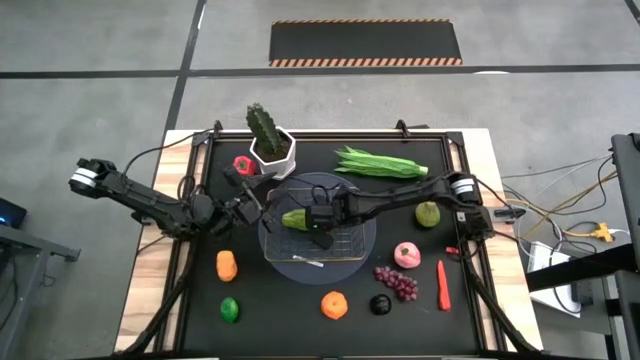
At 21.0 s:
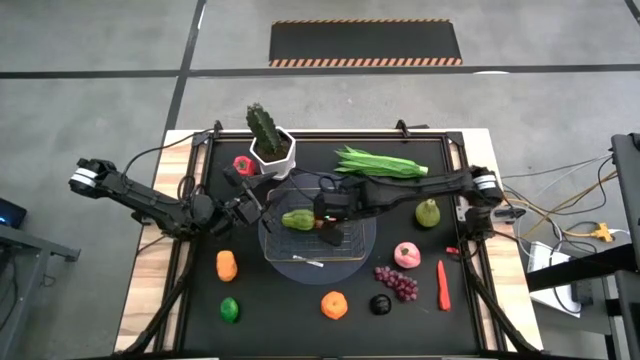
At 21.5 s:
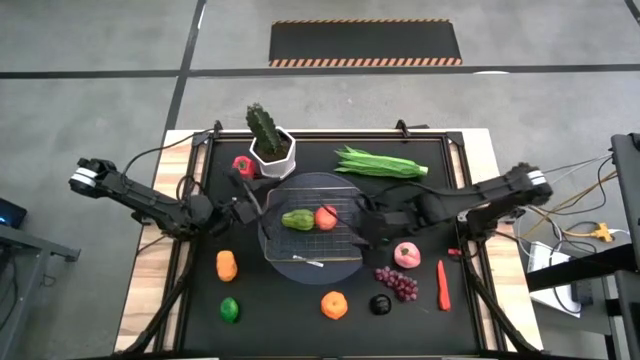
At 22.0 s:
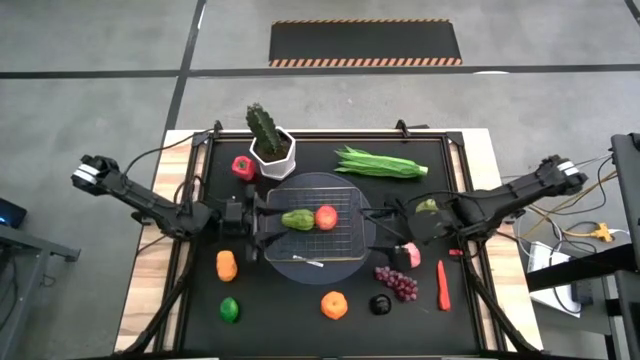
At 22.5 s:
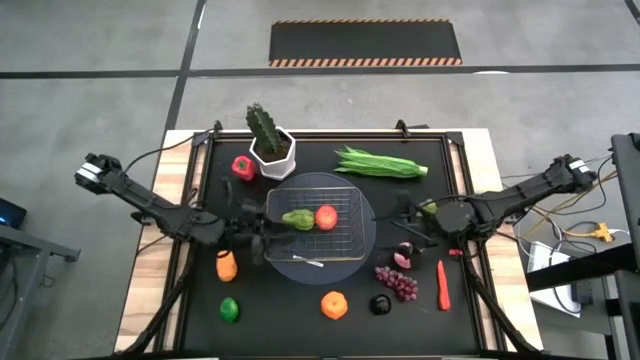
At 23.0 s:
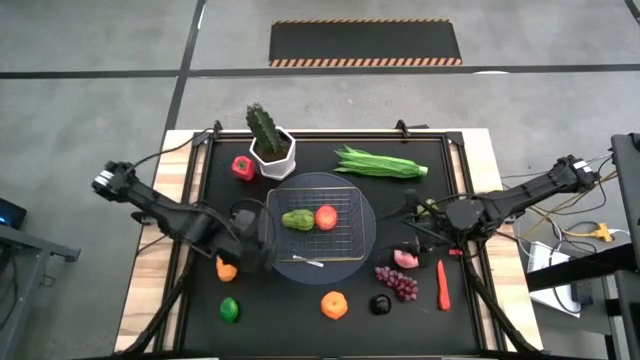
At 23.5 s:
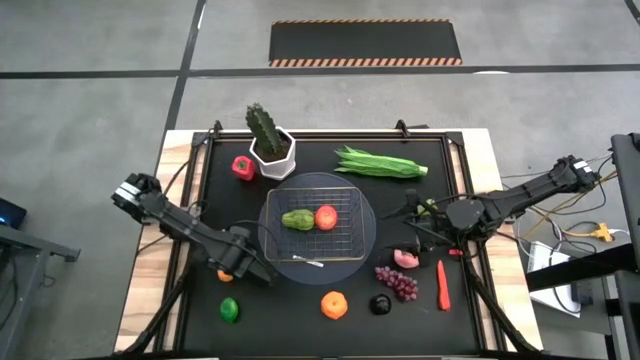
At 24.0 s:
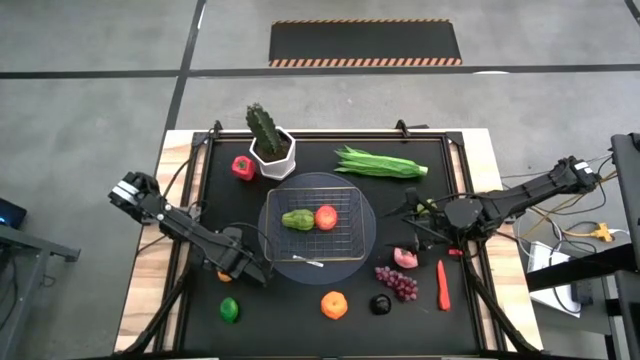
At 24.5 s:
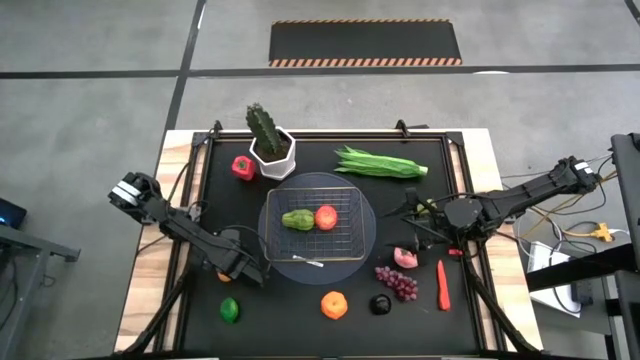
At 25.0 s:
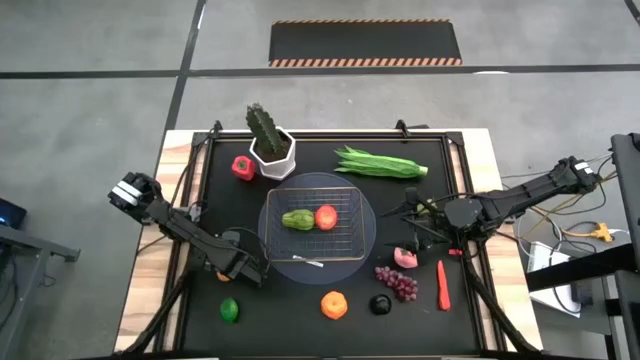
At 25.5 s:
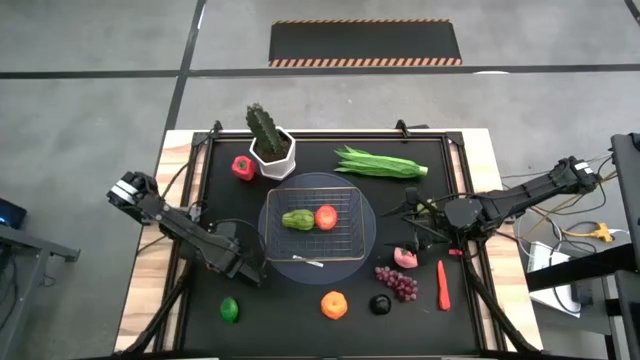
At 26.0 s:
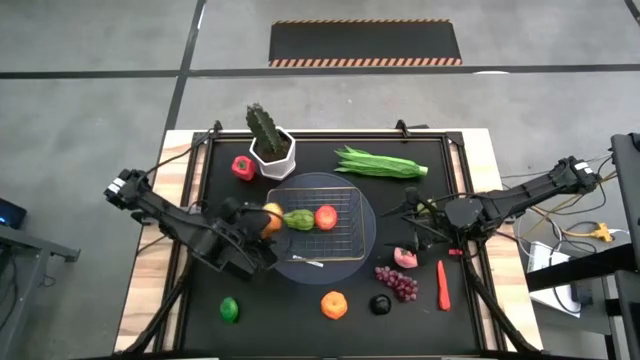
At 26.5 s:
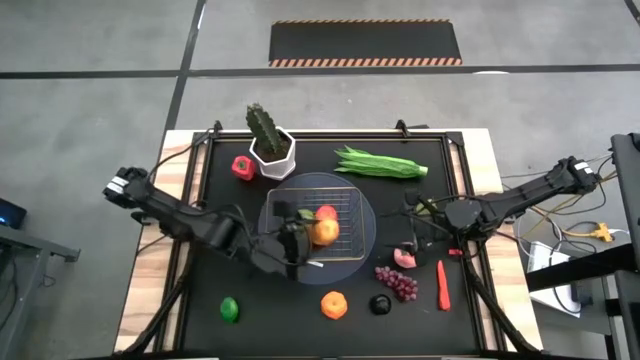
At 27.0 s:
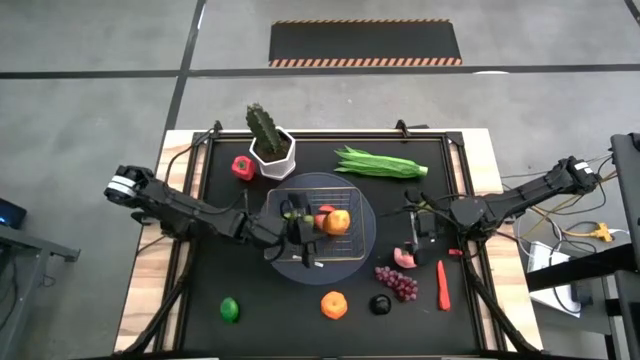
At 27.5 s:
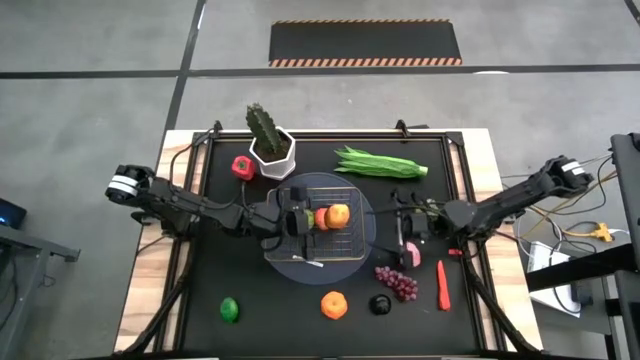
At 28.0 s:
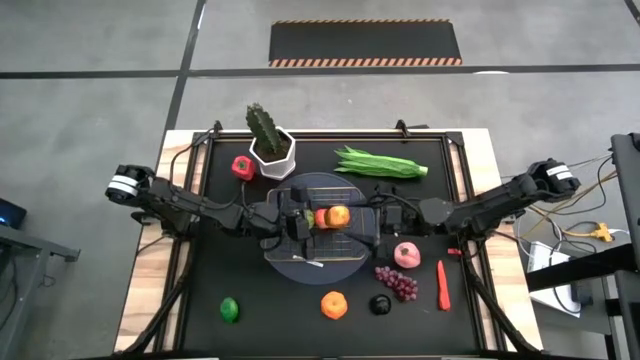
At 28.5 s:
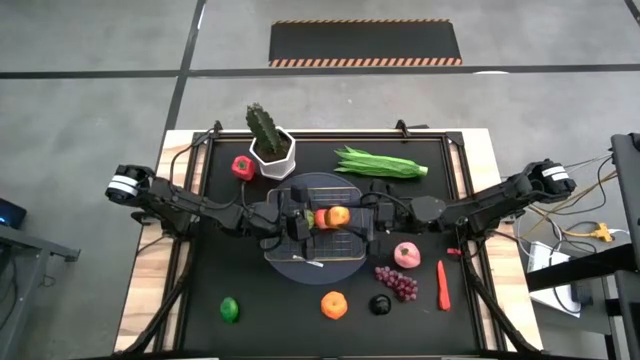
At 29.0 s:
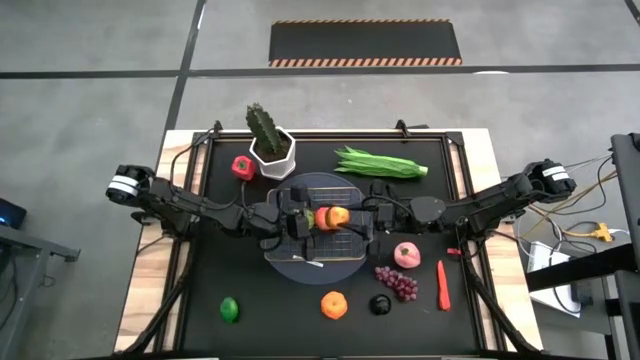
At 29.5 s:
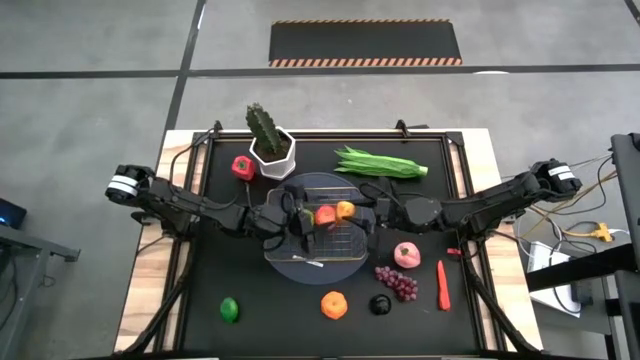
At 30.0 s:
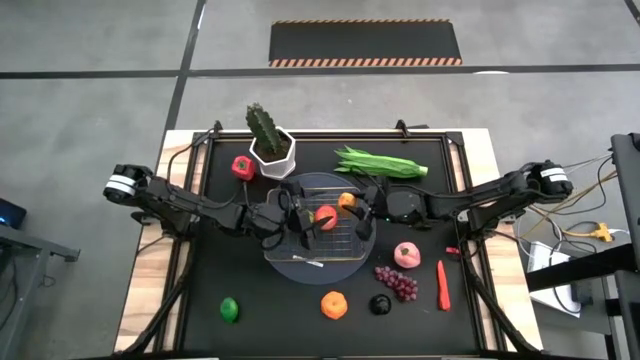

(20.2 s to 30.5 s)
Task: Build produce basket
Put the potato into the wire basket

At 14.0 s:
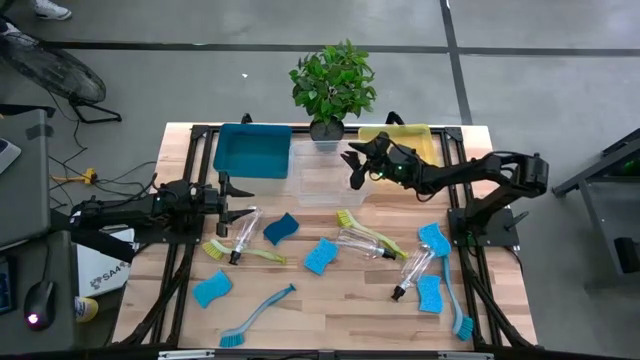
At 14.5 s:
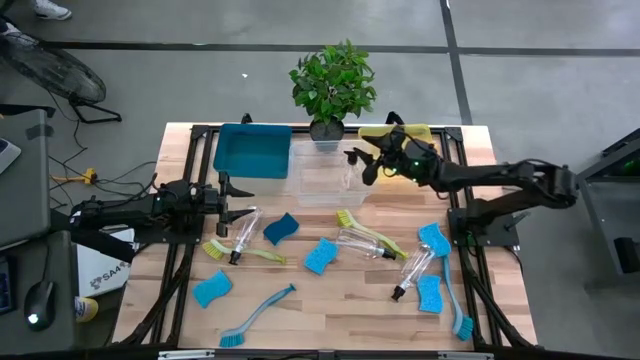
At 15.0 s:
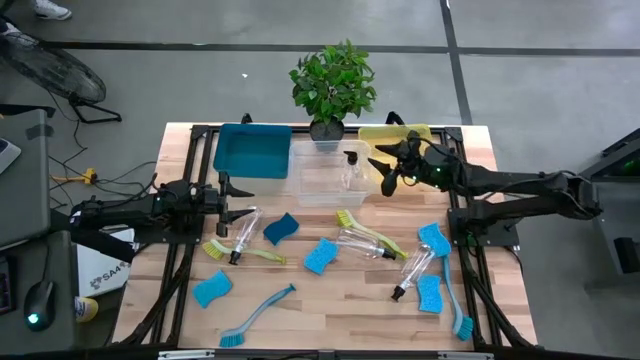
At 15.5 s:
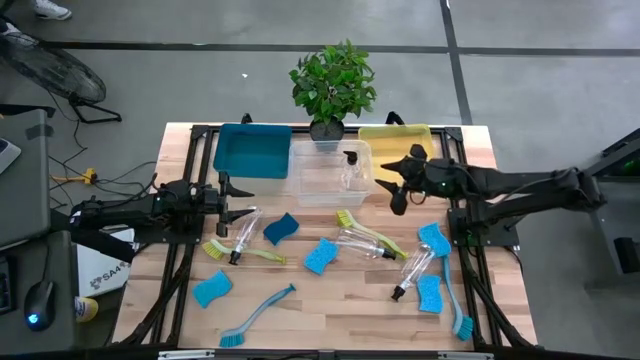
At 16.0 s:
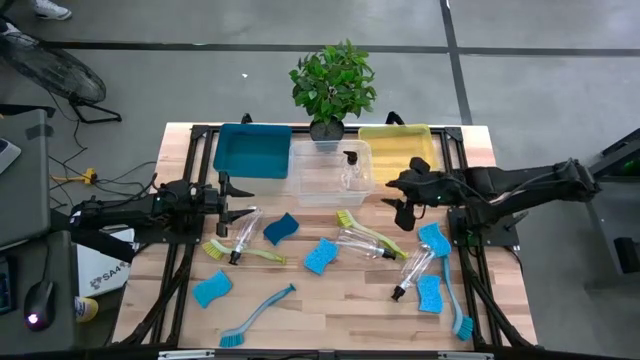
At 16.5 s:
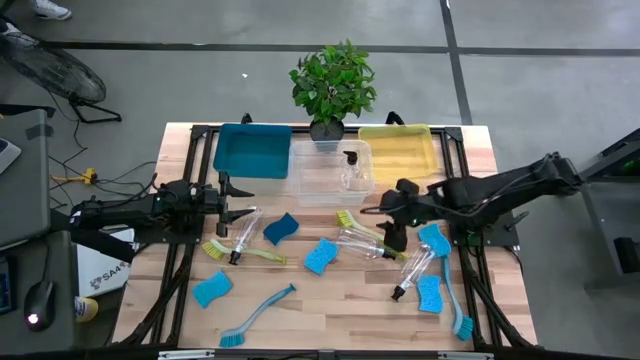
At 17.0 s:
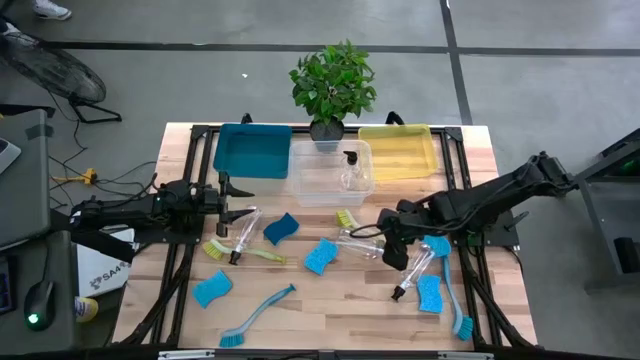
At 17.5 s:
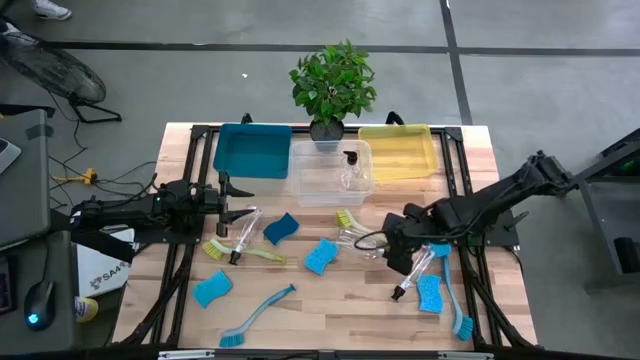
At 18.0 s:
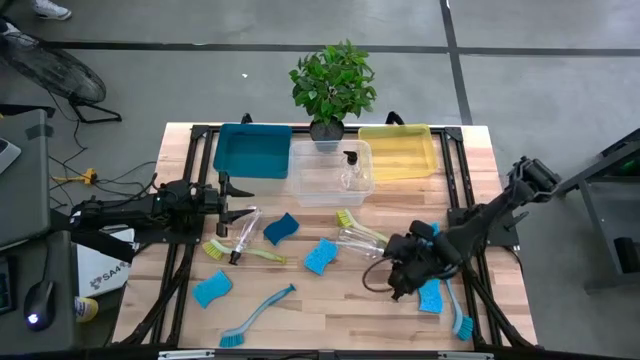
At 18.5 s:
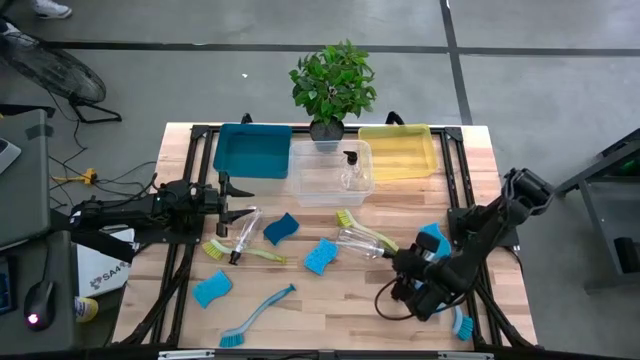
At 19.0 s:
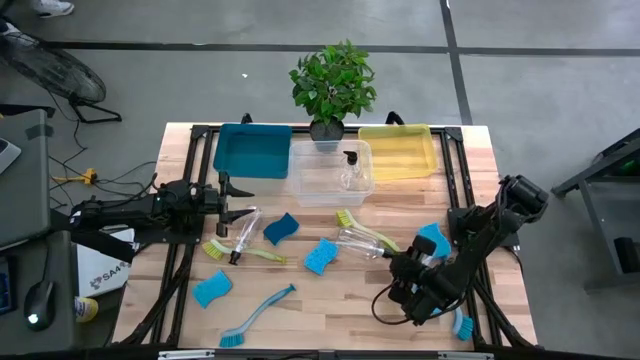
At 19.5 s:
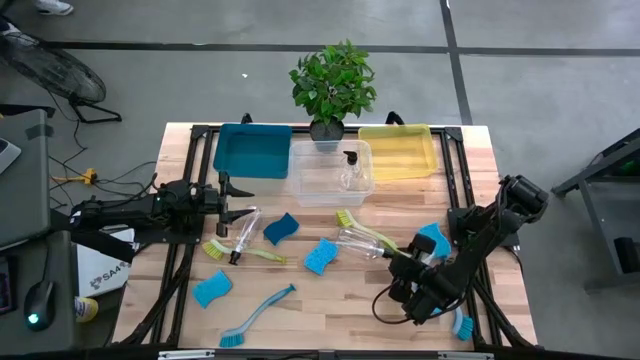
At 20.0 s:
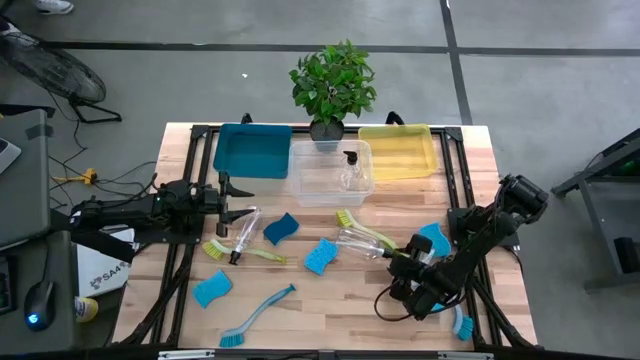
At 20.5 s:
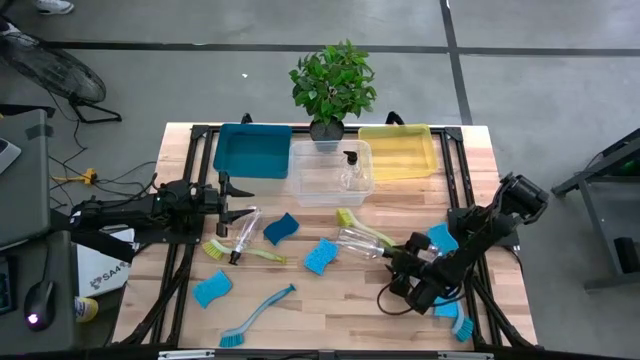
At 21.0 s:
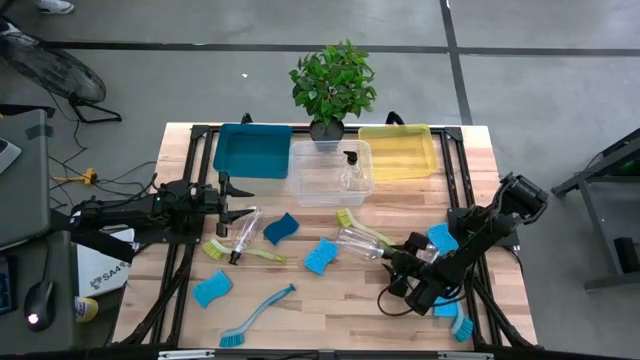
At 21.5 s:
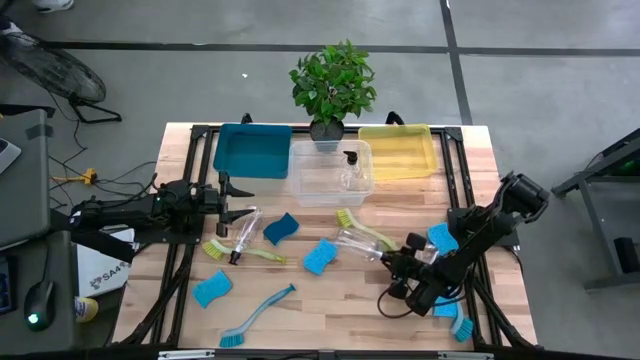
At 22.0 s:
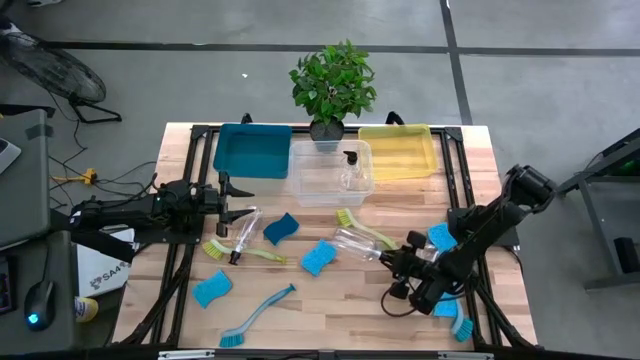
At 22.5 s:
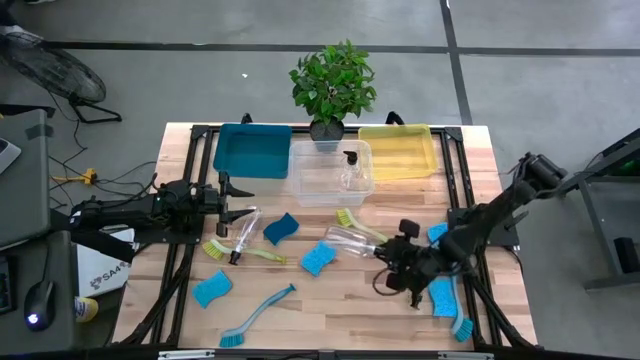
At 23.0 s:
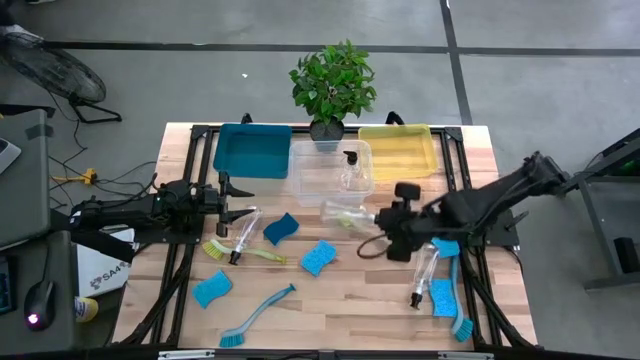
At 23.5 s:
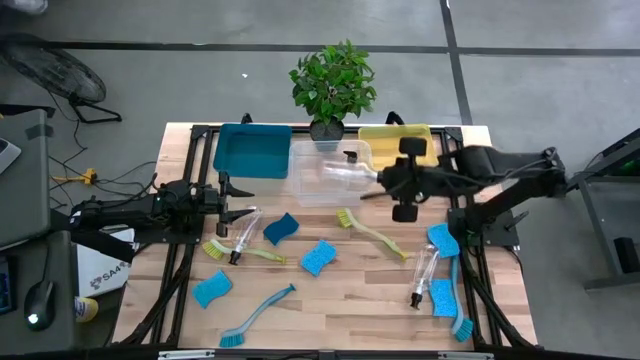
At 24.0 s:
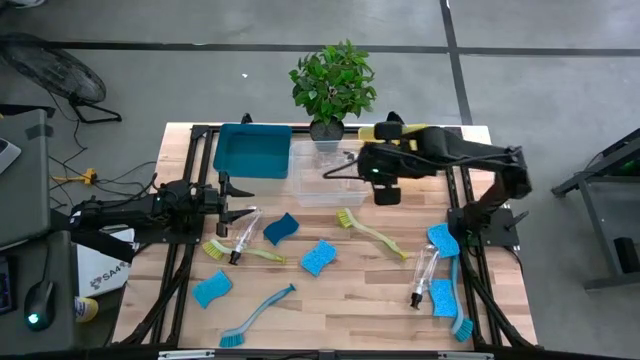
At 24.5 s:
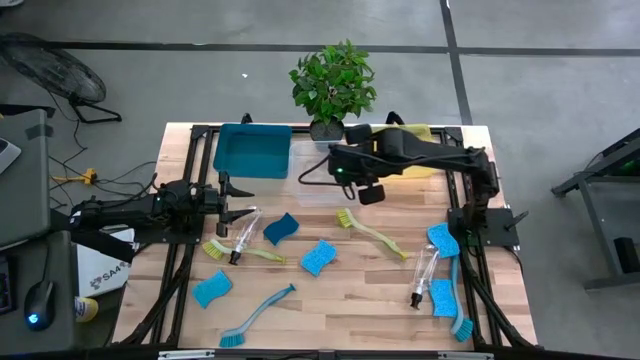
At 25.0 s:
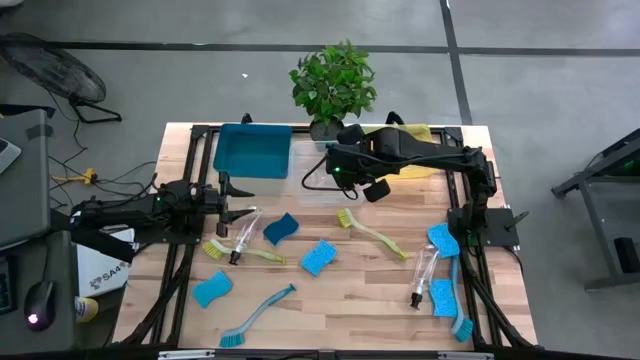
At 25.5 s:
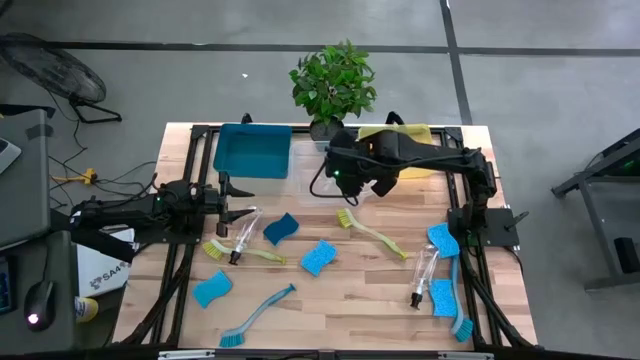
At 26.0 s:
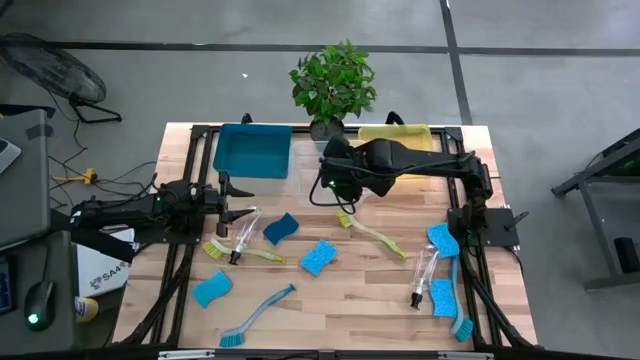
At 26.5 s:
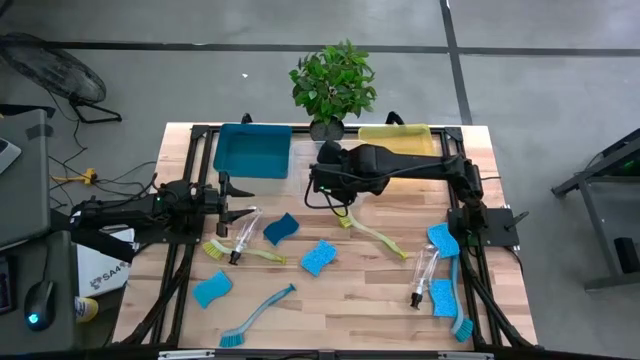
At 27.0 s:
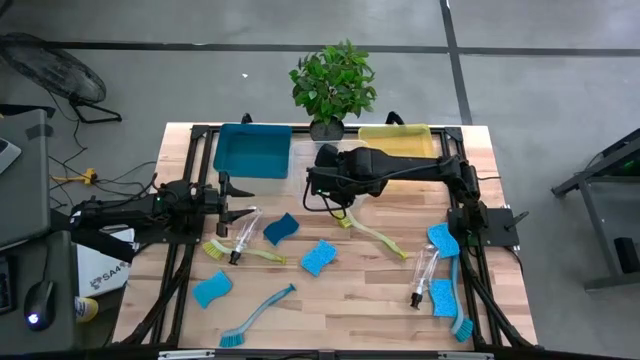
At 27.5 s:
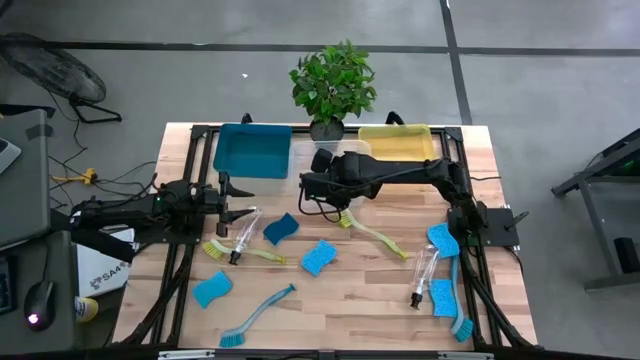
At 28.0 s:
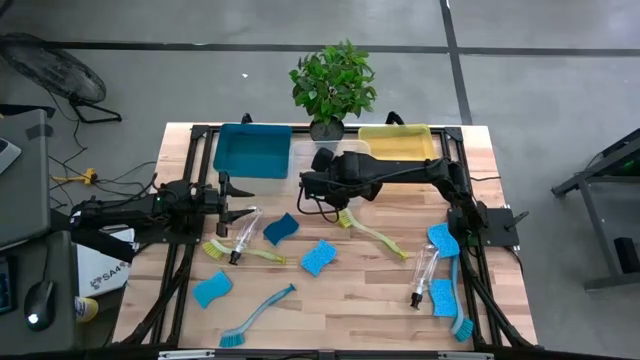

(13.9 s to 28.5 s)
Task: Pick & Place Kitchen Sink Supplies
Put the right transparent soap dispenser into the transparent bin
